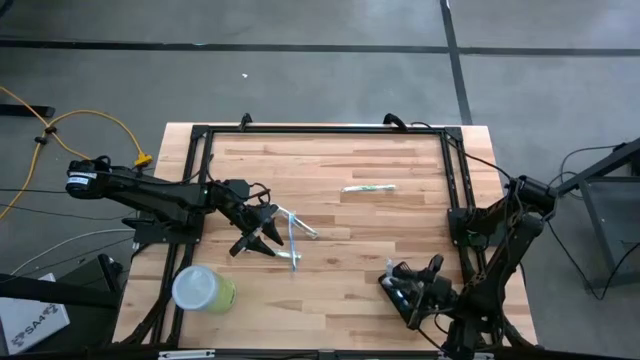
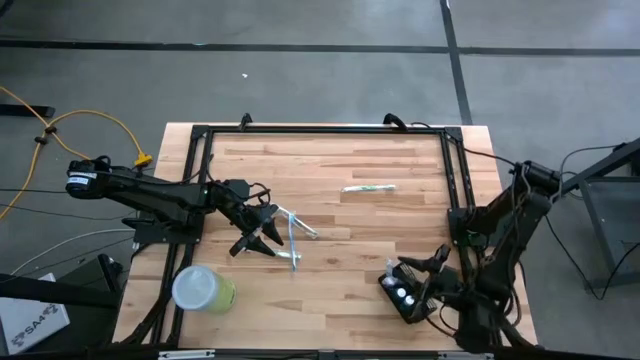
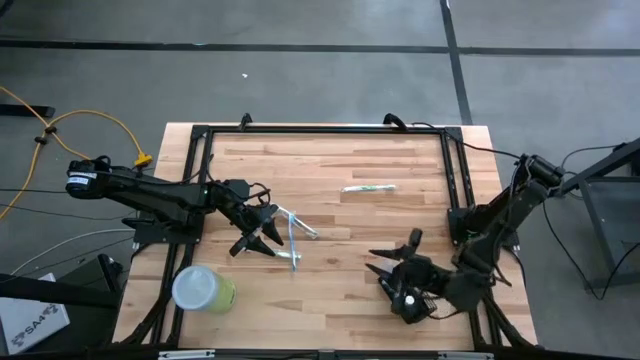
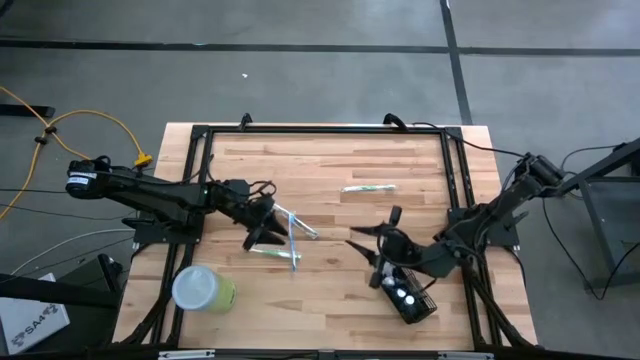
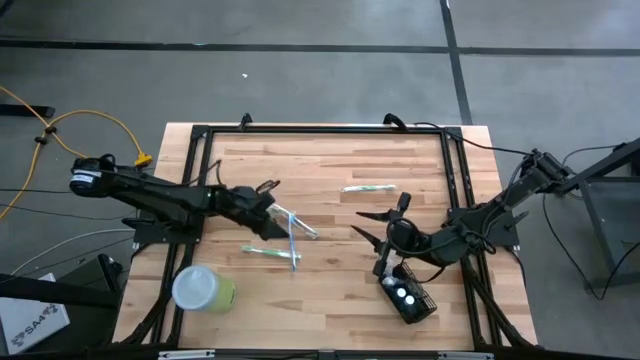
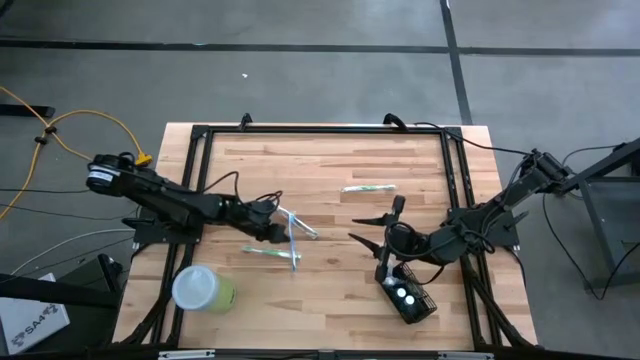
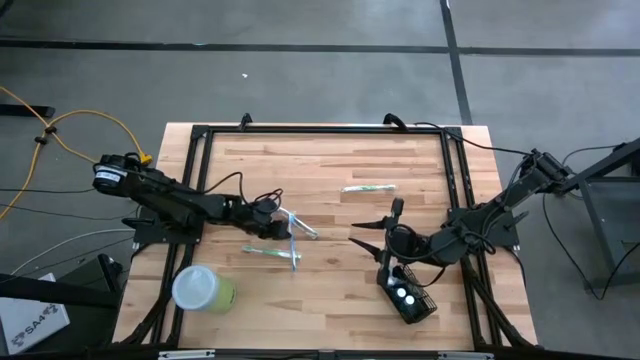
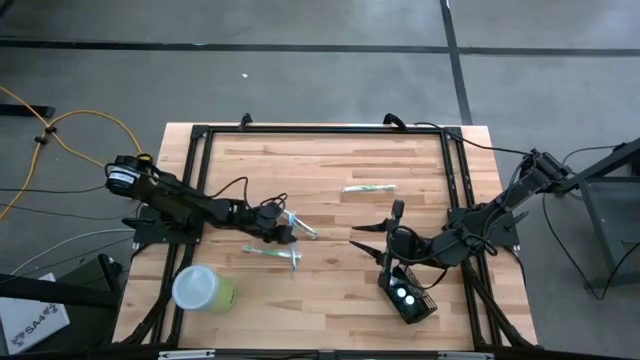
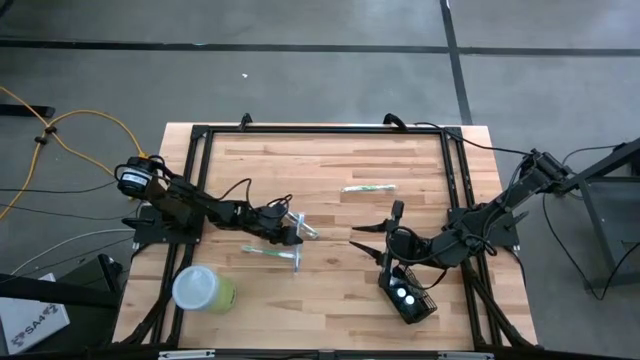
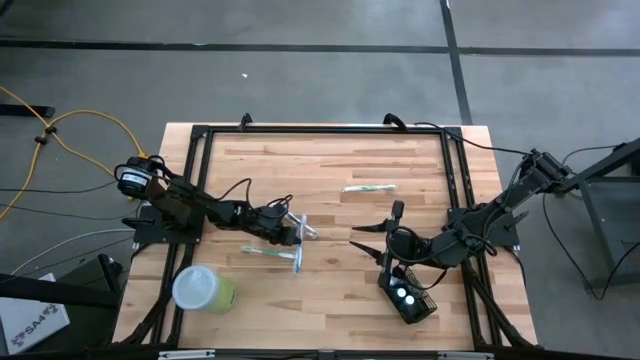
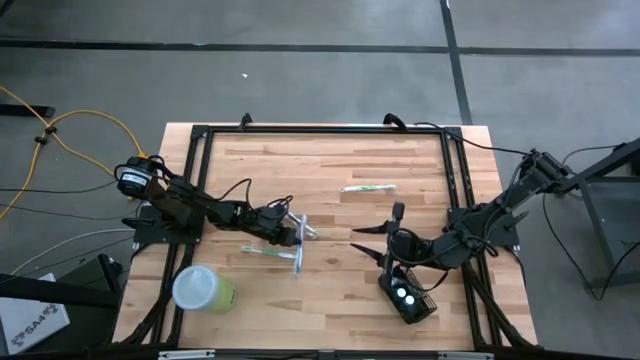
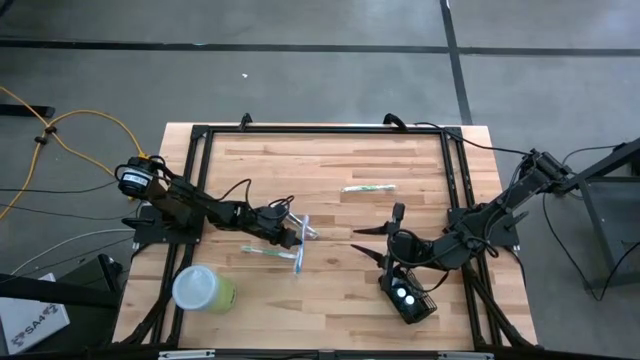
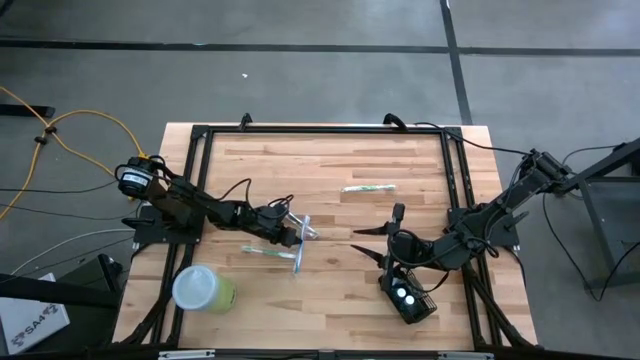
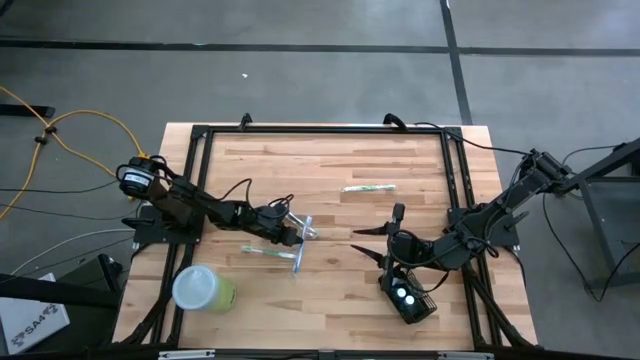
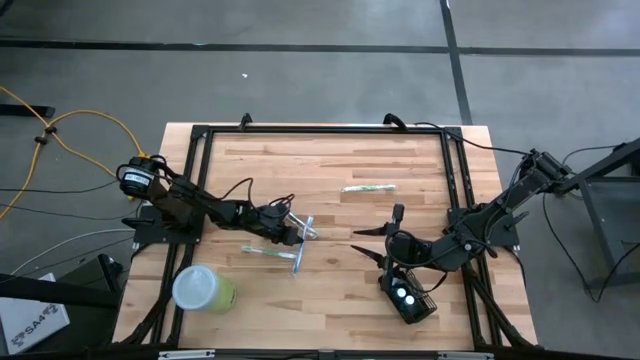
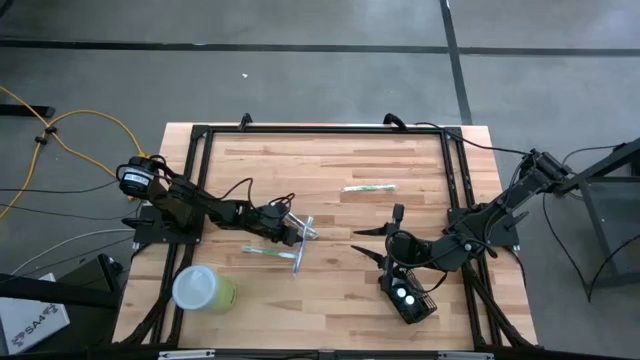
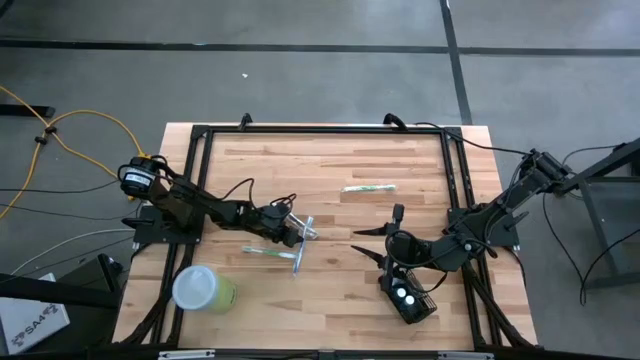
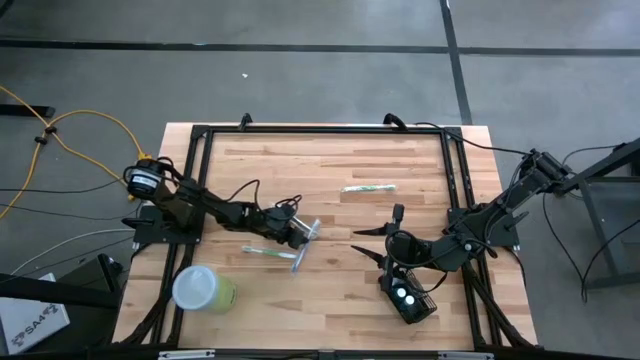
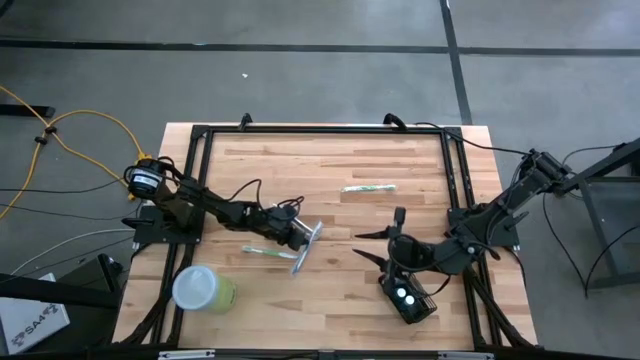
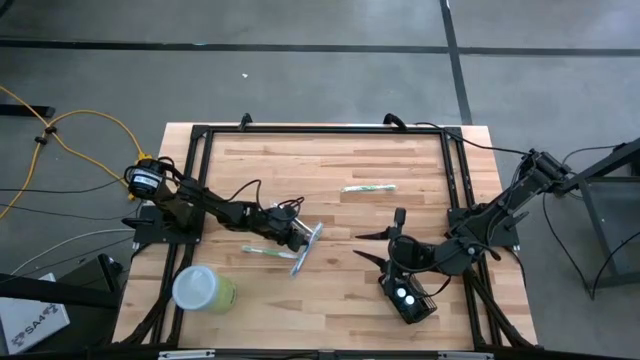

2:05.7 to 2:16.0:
Task: Pick & Place toothbrushing station
Put the blue toothbrush into the top section of the black wire organizer

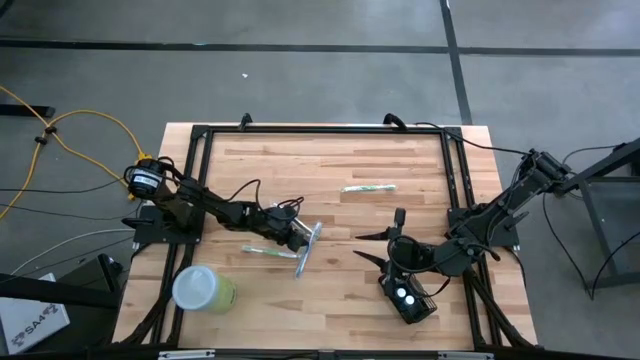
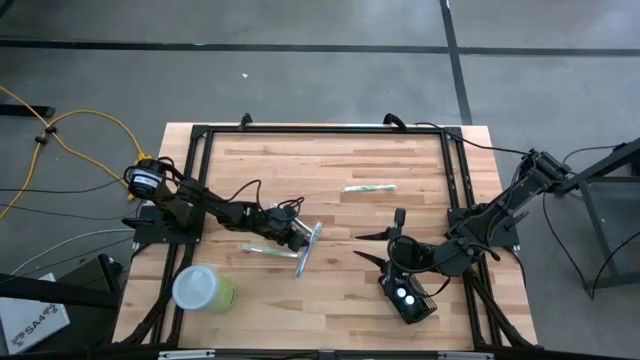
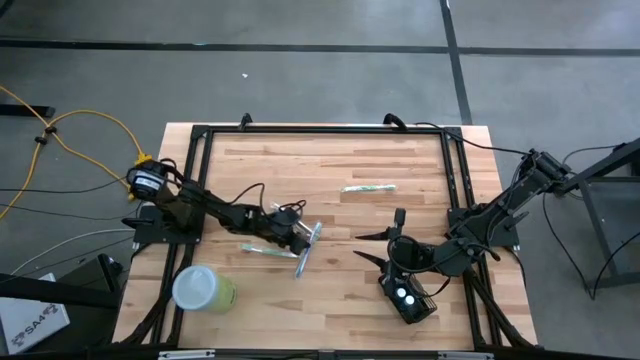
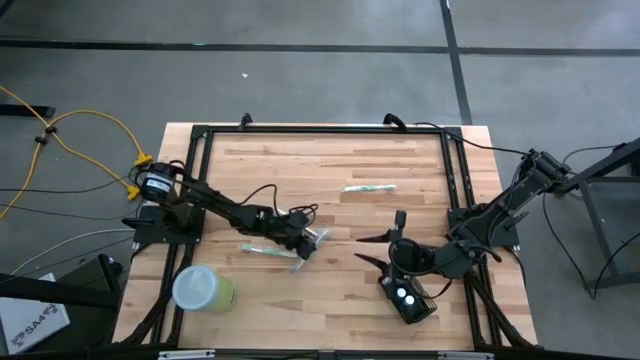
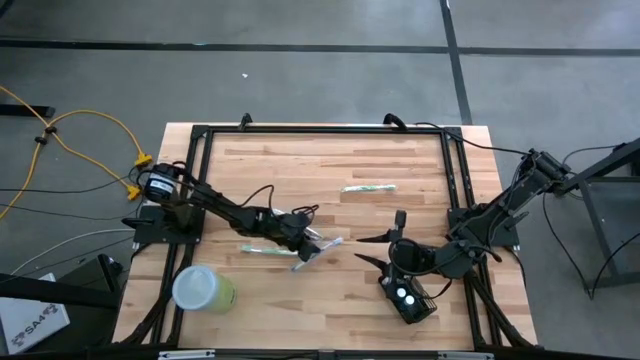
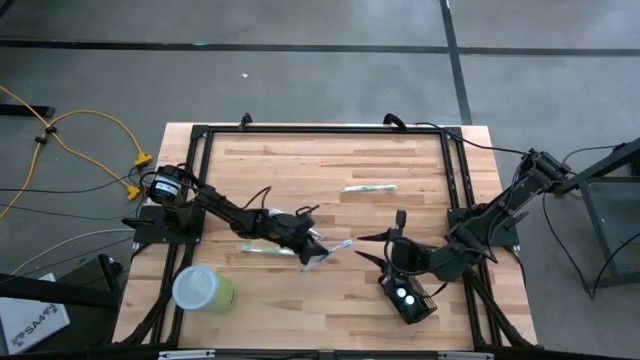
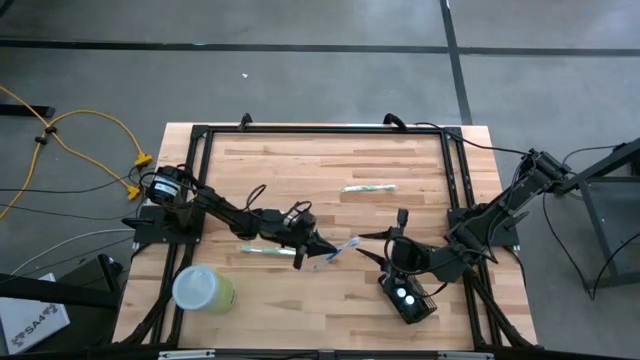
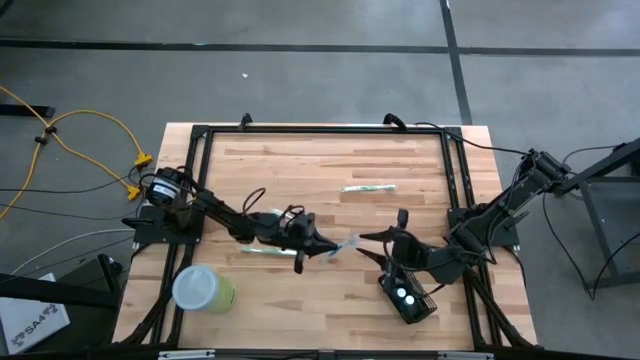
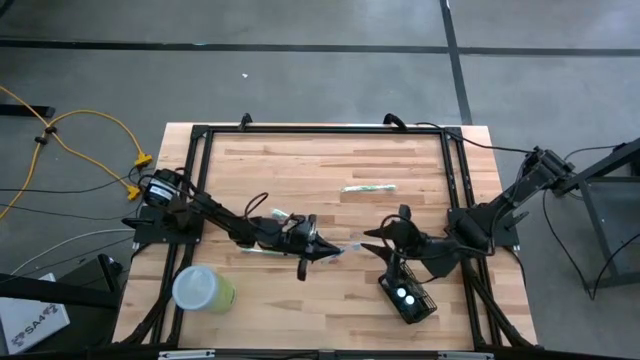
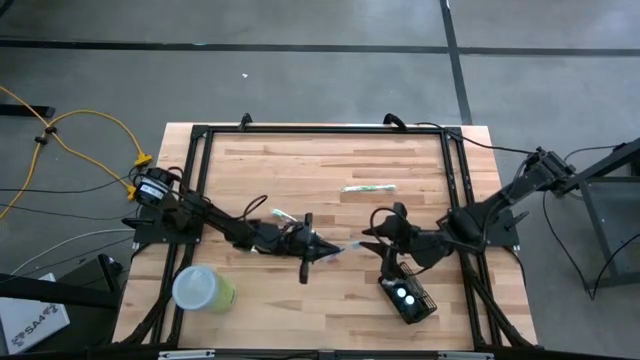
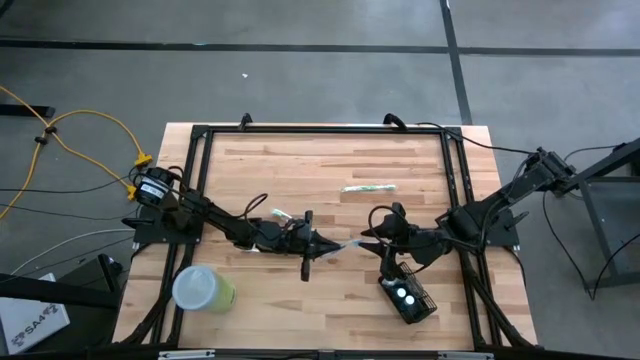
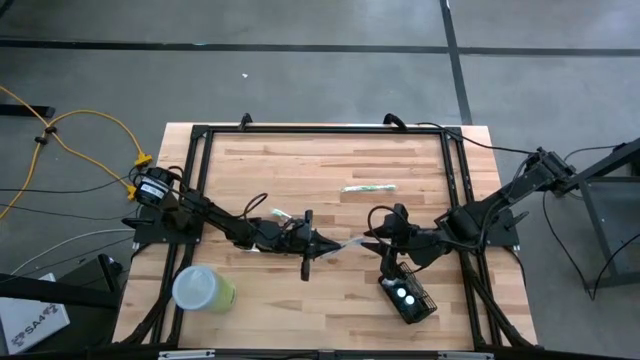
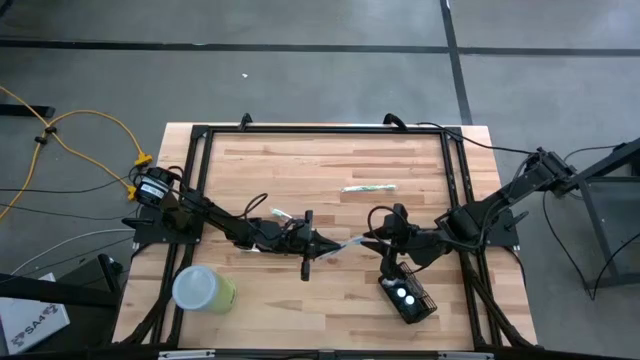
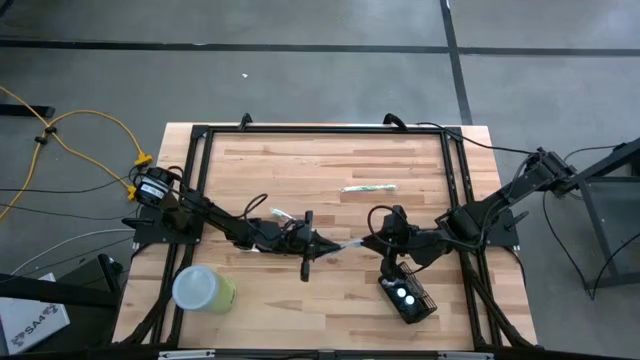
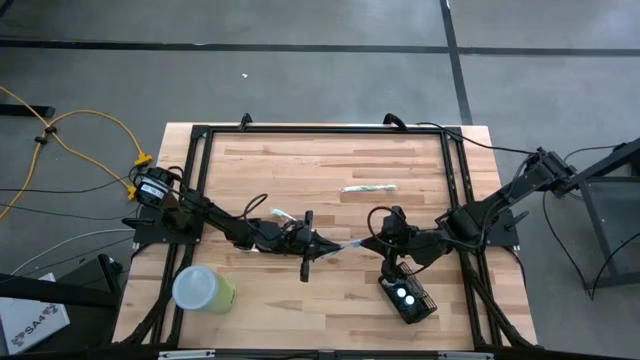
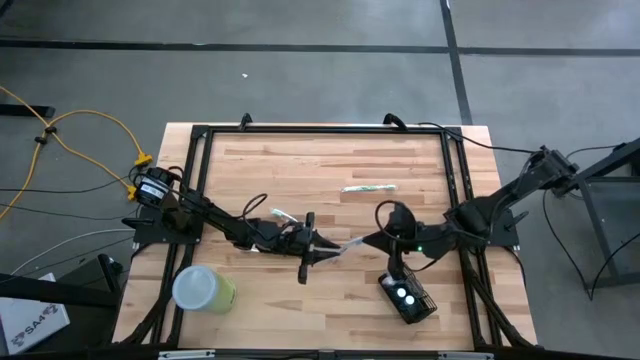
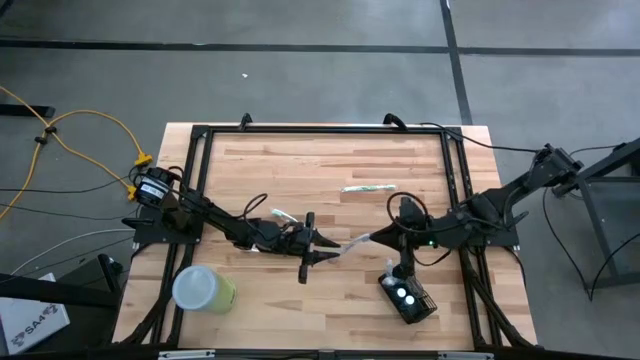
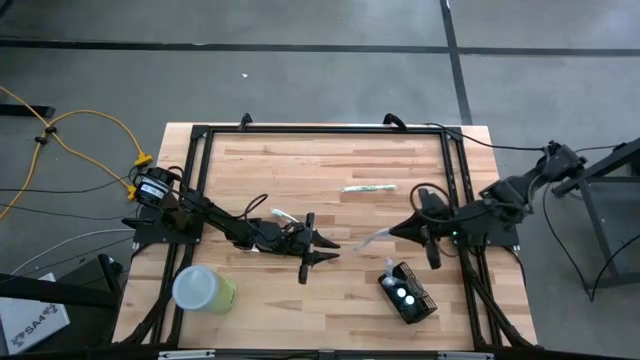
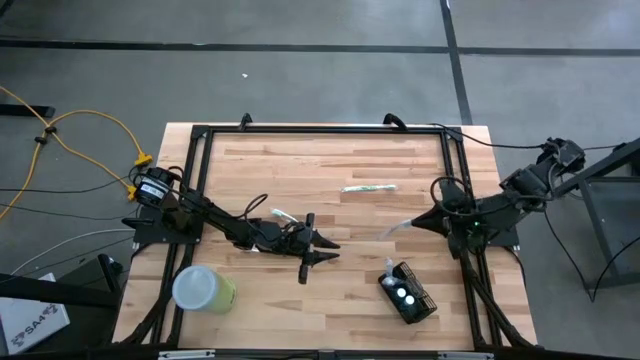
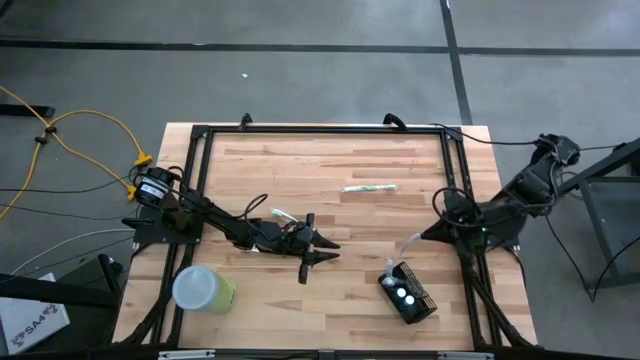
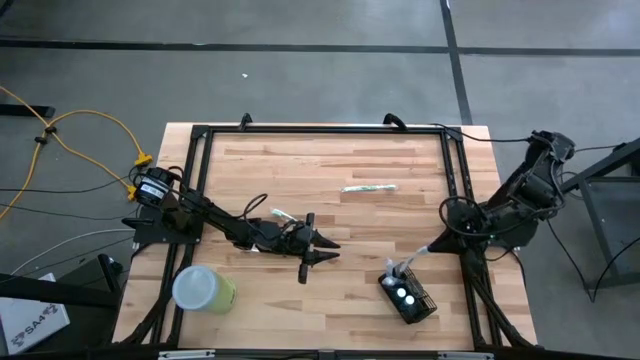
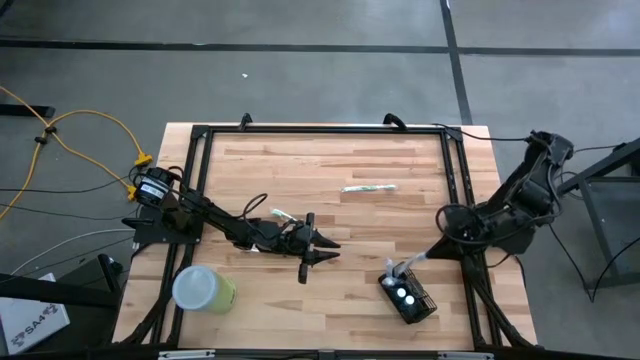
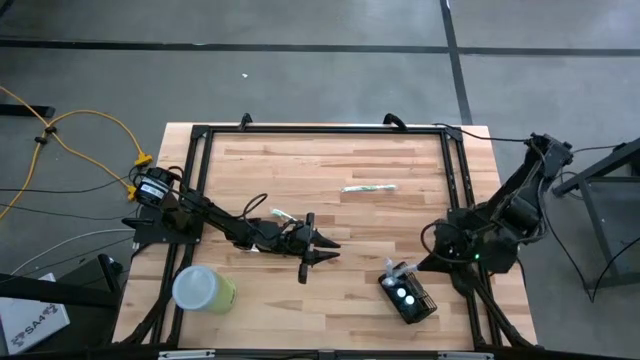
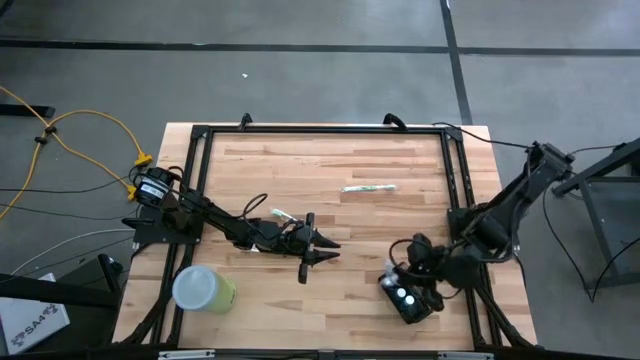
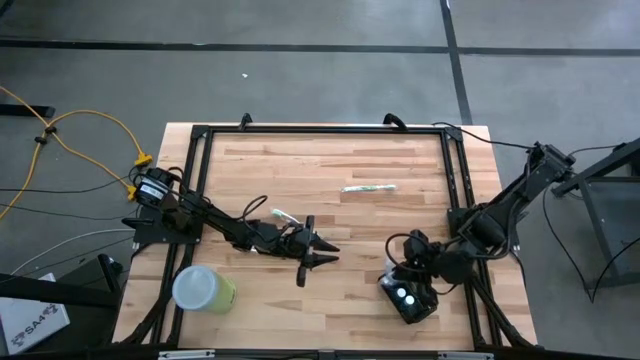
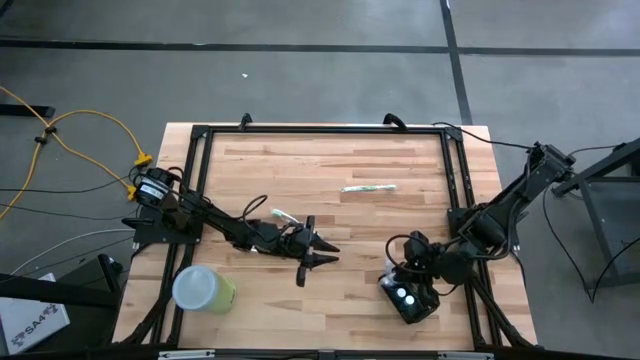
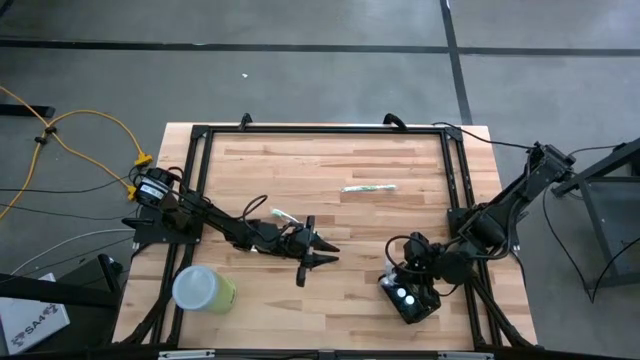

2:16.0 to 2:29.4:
Put the blue toothbrush into the top section of the black wire organizer
